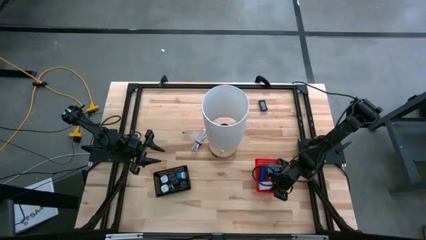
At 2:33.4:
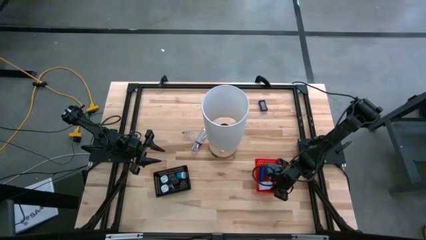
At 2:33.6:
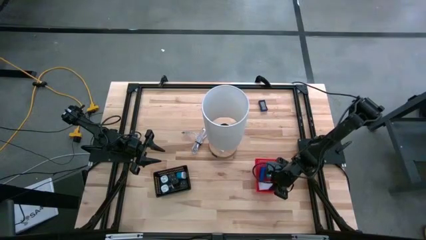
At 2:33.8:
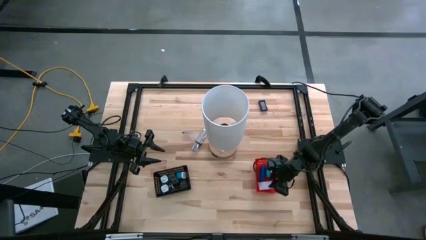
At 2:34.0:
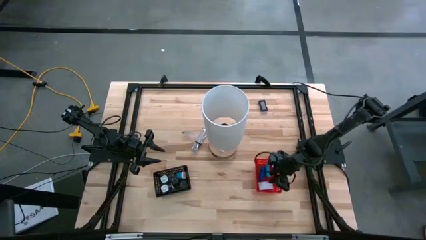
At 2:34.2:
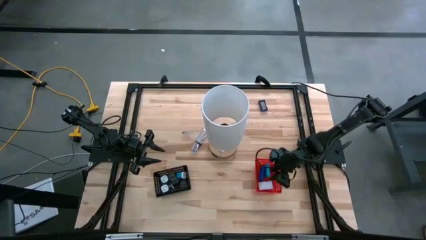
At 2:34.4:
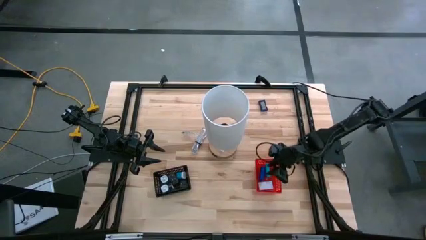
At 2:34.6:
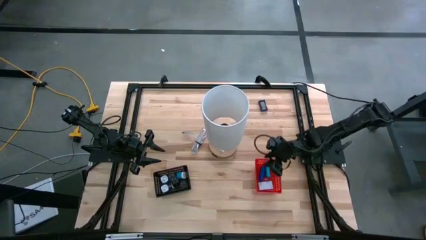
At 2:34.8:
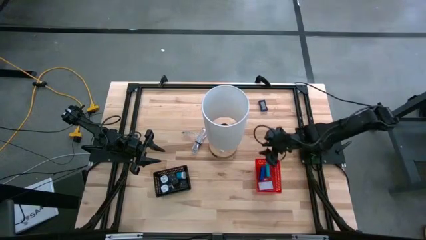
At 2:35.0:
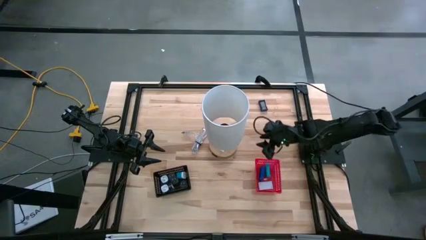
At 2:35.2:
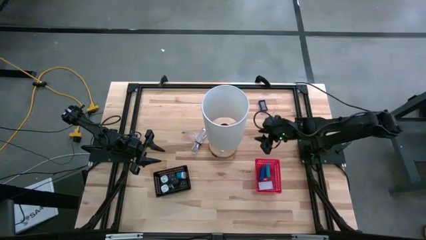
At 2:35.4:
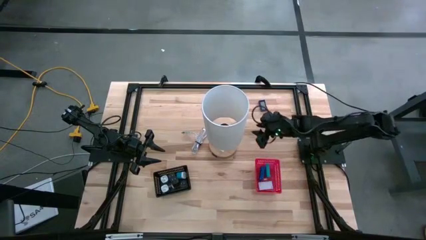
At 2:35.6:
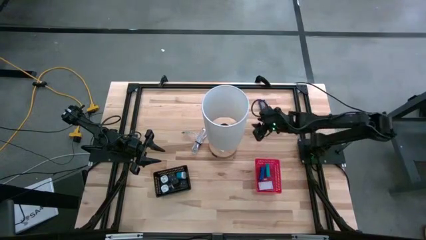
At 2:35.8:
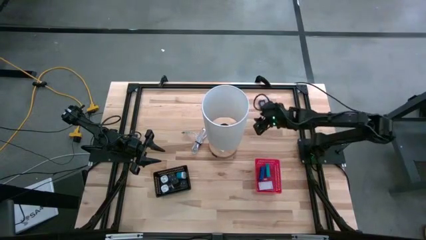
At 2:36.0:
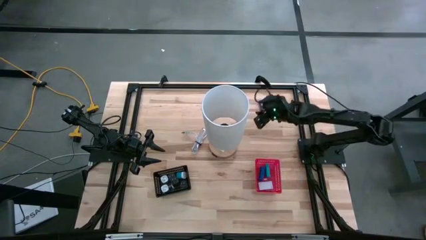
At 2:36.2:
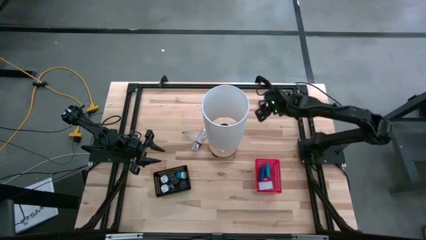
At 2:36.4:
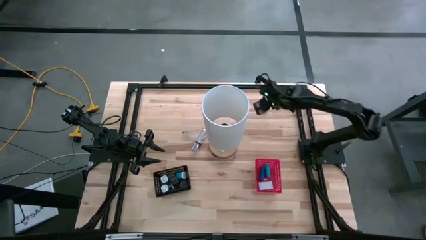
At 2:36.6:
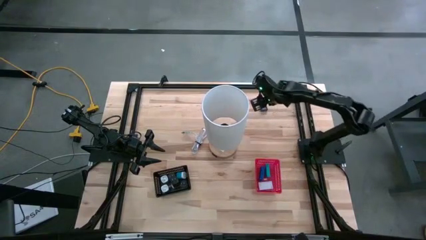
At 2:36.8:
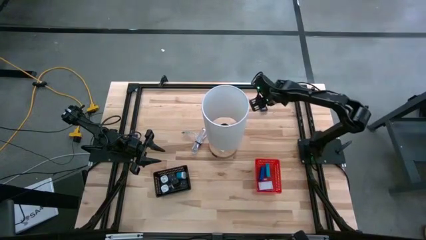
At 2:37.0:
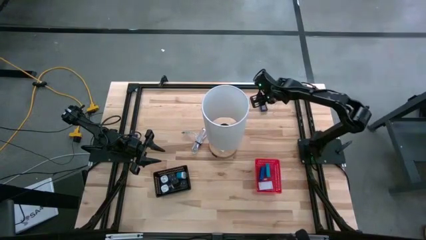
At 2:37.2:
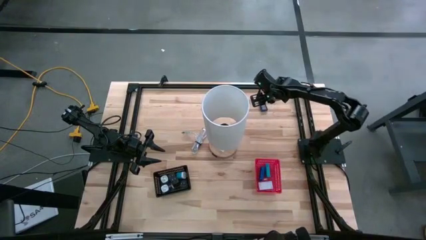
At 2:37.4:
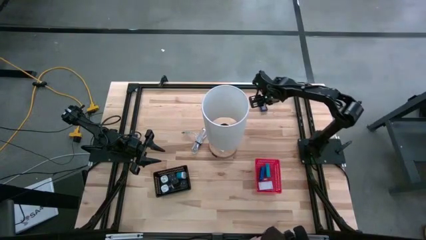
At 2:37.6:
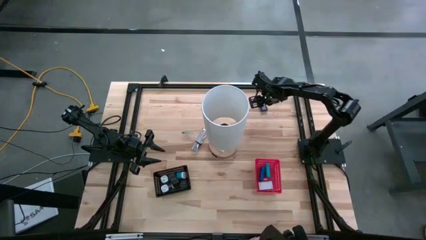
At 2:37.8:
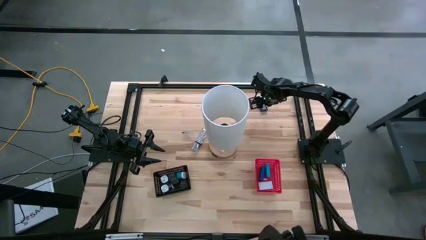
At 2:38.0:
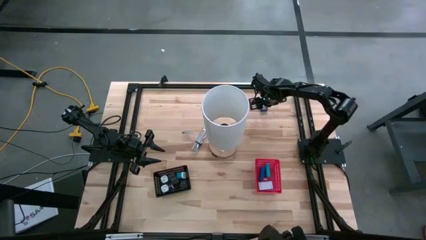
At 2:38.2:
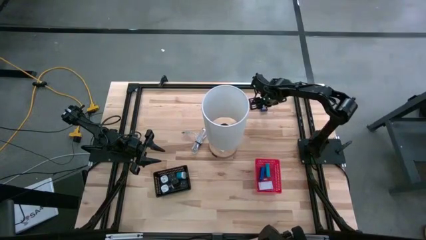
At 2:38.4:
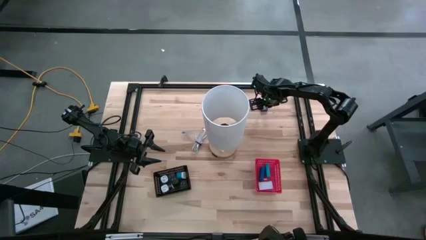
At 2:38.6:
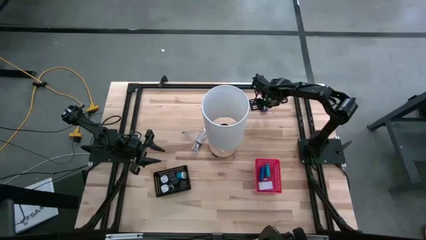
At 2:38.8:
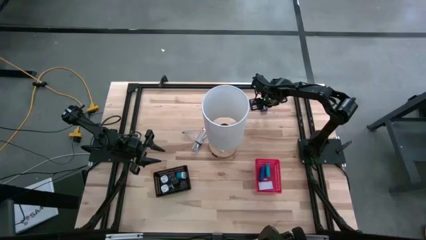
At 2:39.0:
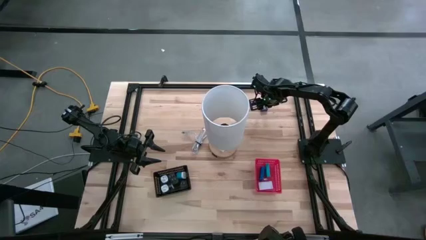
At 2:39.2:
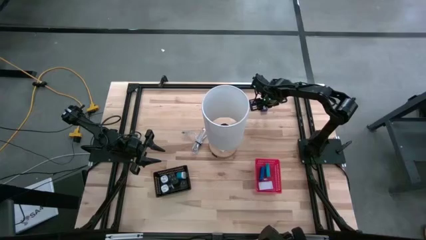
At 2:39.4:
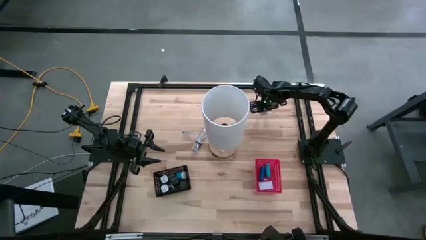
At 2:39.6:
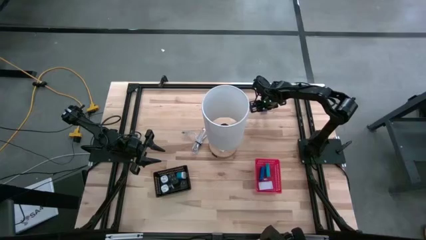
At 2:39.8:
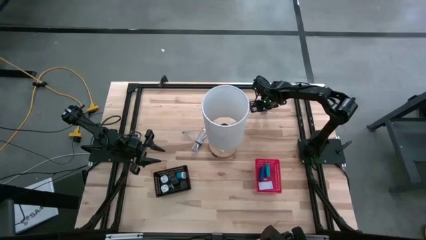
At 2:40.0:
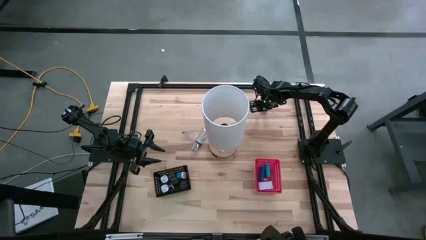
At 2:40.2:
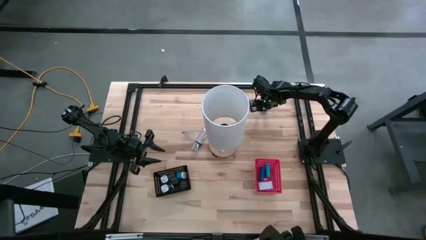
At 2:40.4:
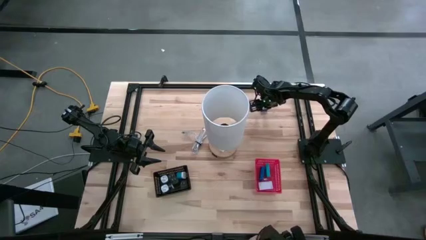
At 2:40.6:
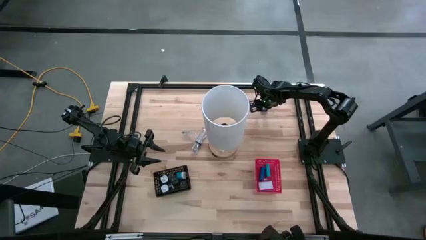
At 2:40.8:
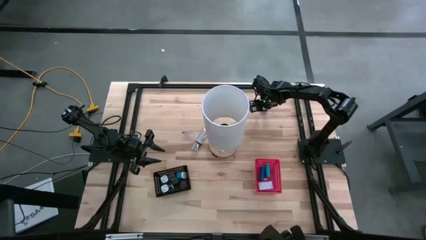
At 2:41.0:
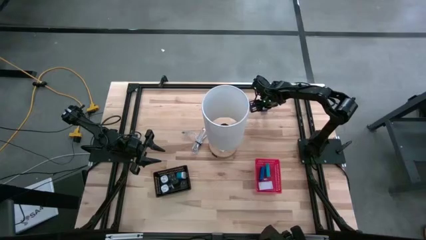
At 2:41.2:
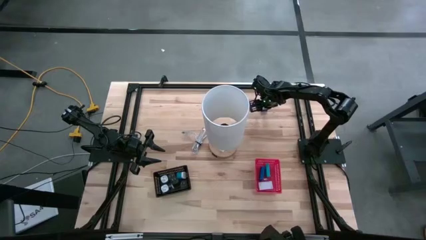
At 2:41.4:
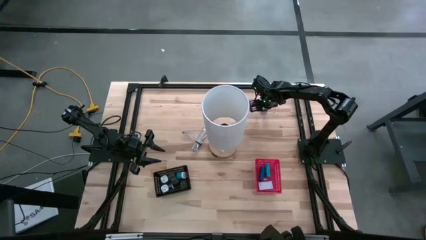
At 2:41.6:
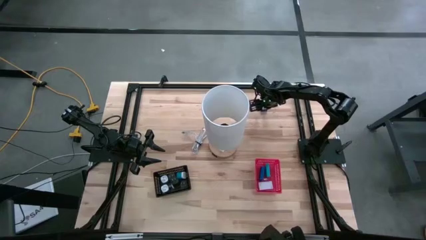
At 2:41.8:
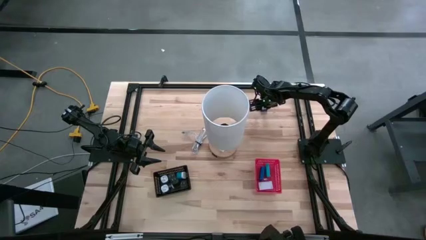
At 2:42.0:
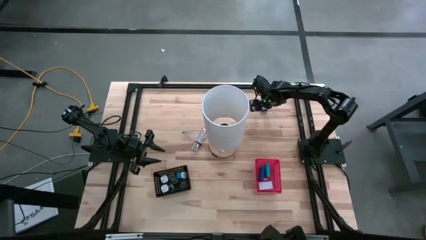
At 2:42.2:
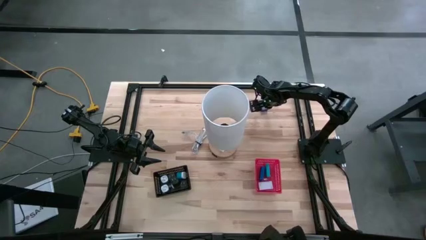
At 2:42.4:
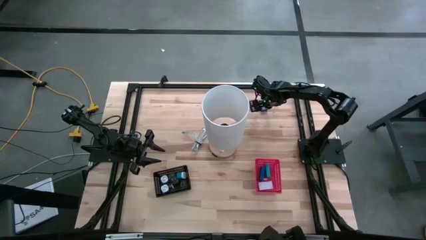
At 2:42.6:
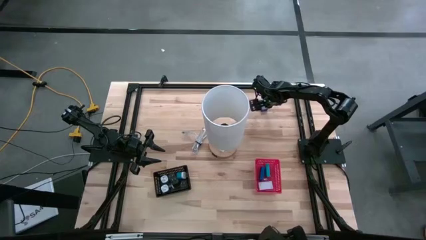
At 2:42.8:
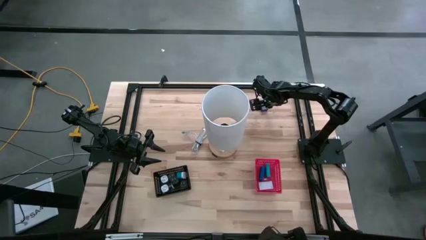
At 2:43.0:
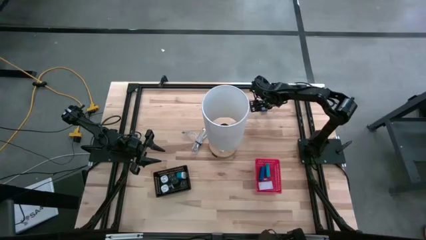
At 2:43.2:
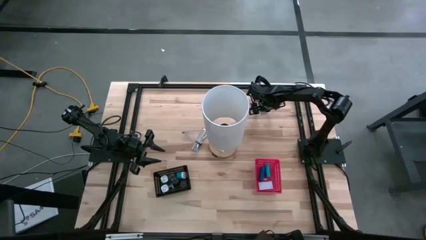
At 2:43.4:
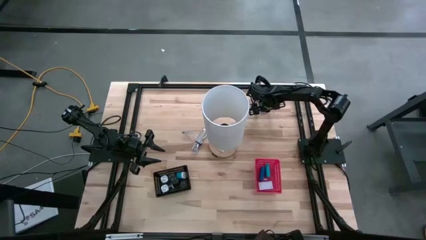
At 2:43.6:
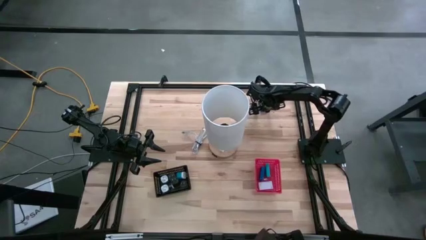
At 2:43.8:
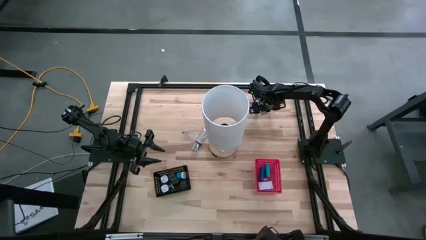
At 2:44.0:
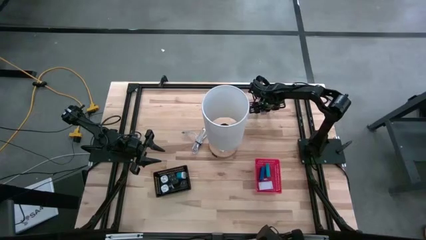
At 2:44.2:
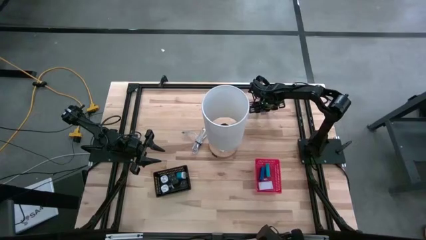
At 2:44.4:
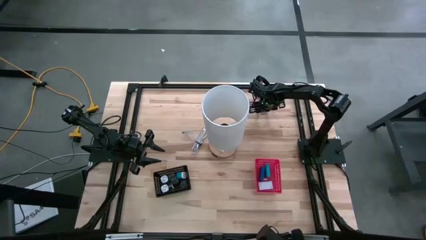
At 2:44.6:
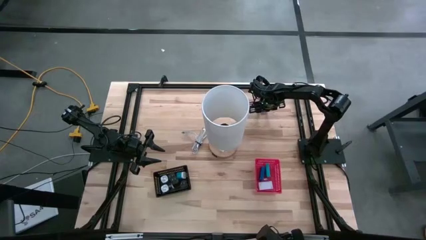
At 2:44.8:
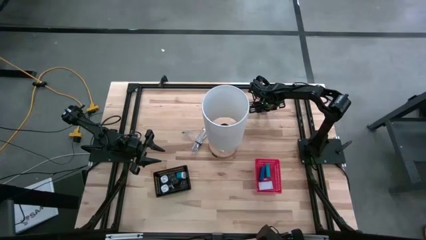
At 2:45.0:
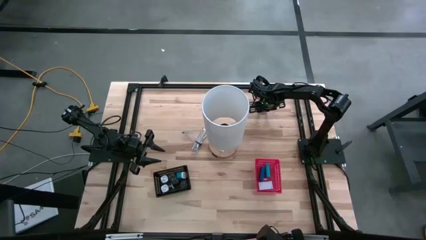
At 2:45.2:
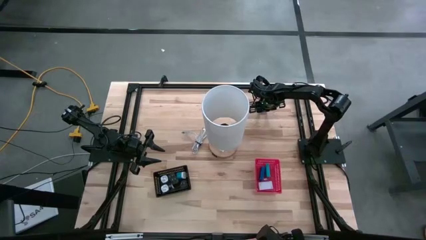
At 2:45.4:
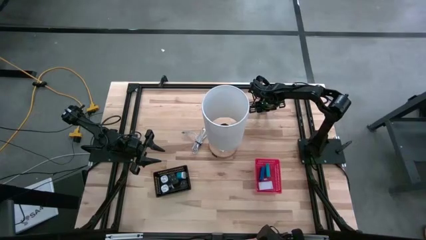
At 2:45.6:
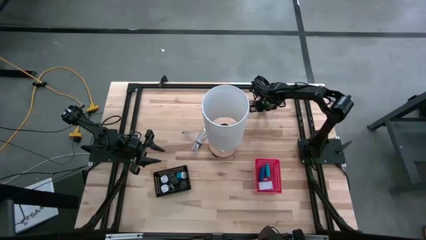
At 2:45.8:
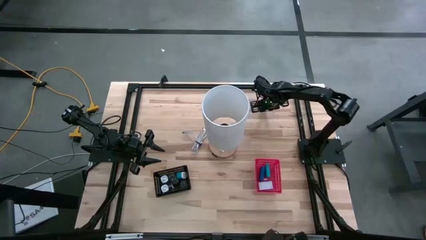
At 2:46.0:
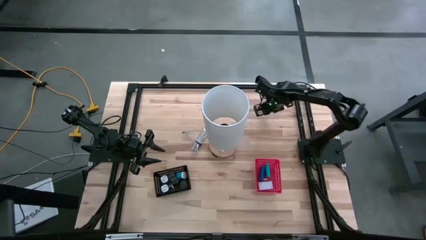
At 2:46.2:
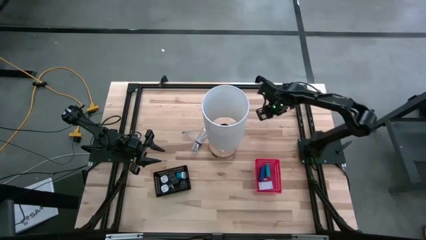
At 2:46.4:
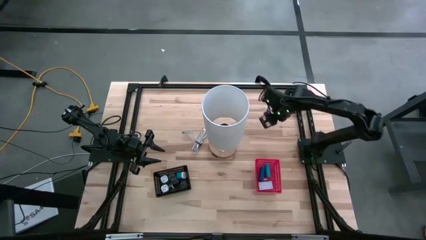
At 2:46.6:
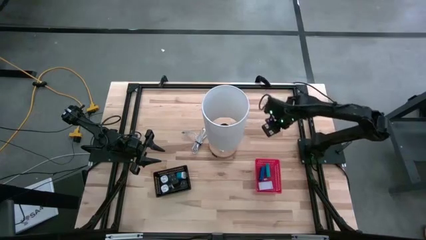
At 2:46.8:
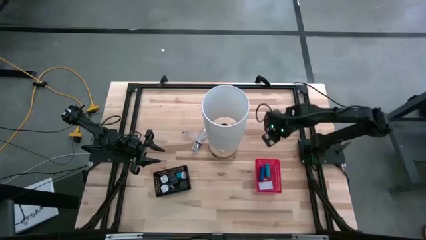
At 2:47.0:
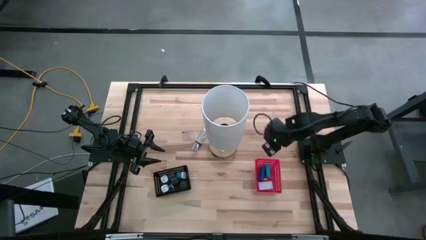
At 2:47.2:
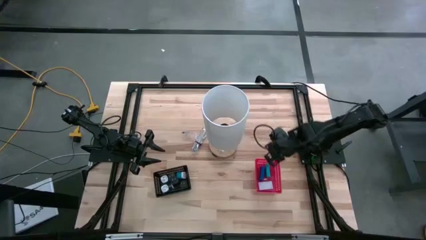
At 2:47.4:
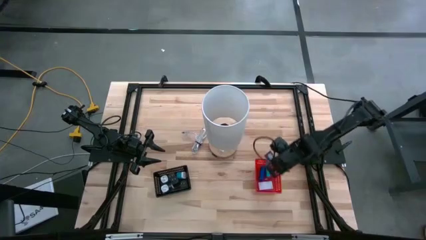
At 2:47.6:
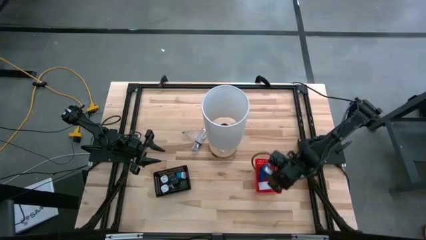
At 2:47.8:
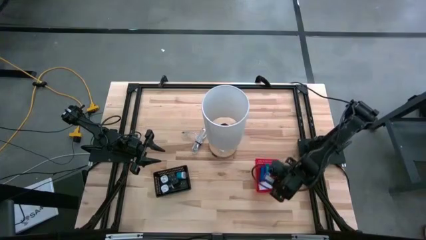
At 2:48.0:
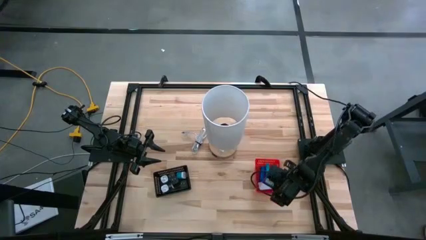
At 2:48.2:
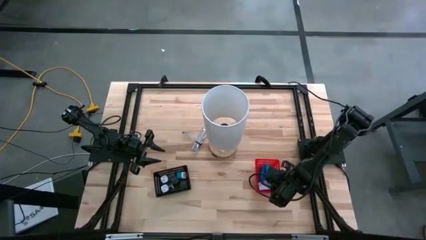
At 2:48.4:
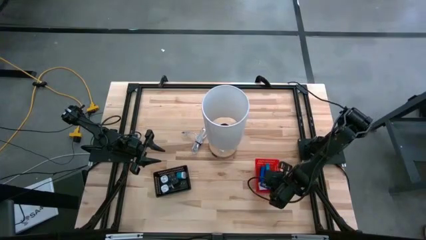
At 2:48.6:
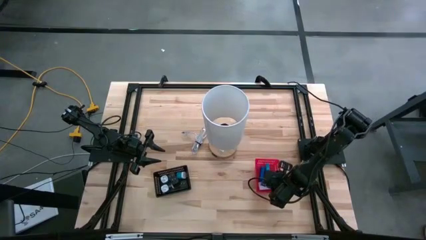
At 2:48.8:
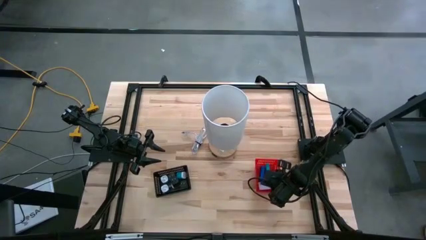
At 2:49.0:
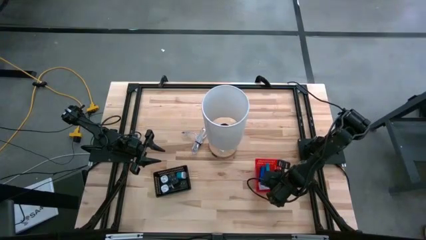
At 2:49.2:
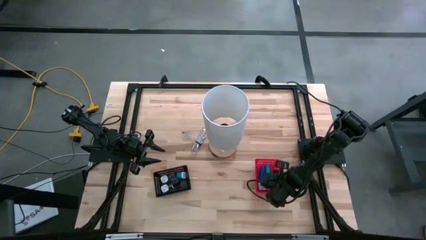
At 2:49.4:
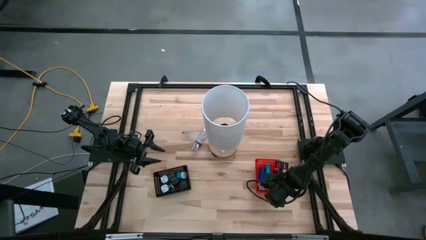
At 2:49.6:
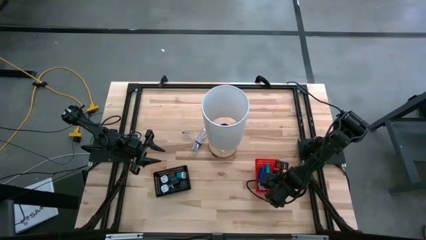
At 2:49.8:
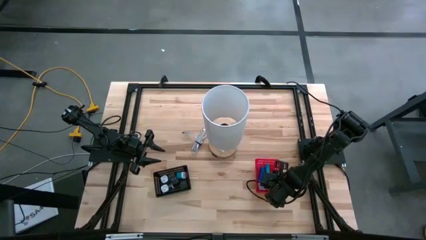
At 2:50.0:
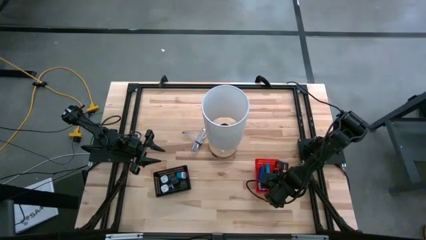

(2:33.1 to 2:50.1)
Task: Pick & Place Office items
Put the blue digital clock into the orange bin
